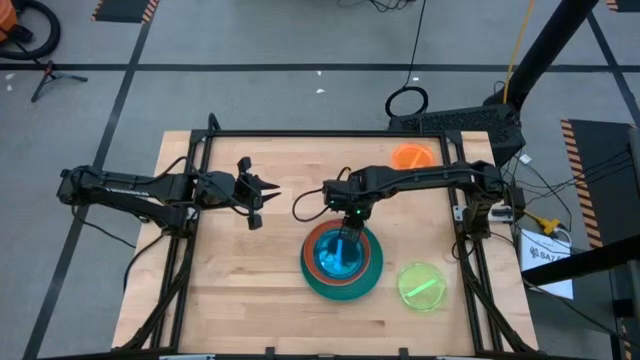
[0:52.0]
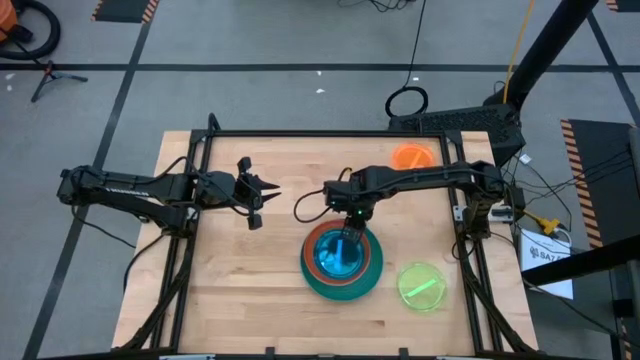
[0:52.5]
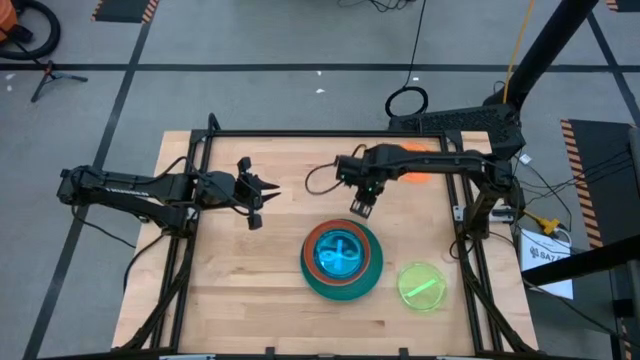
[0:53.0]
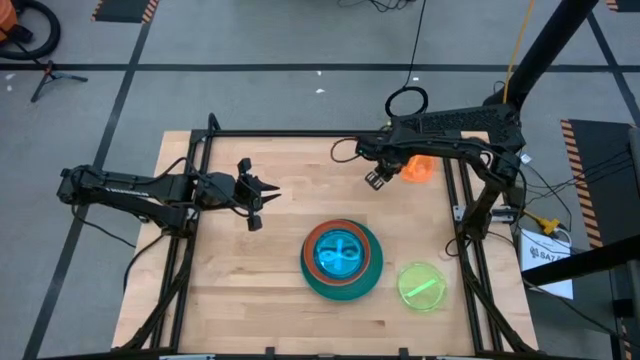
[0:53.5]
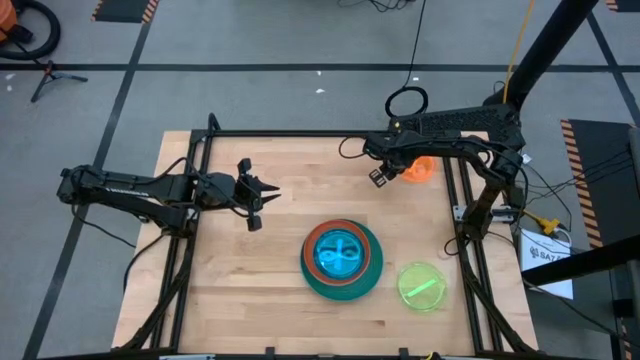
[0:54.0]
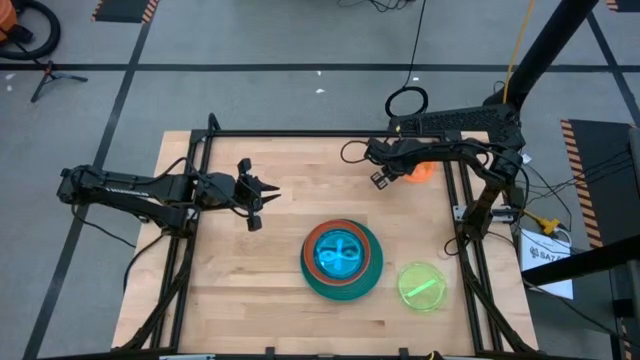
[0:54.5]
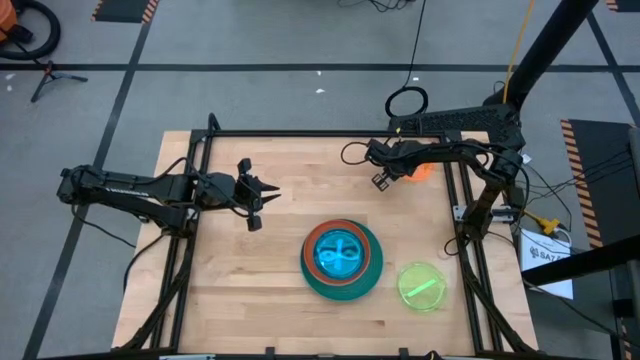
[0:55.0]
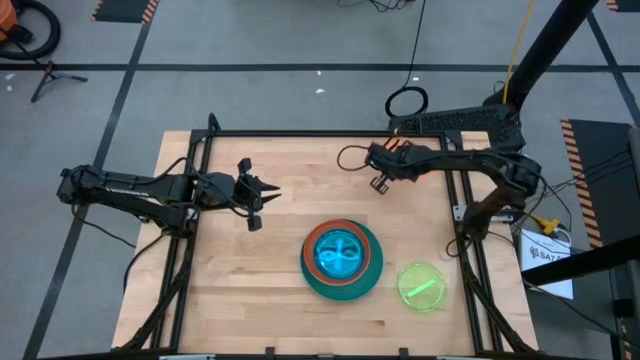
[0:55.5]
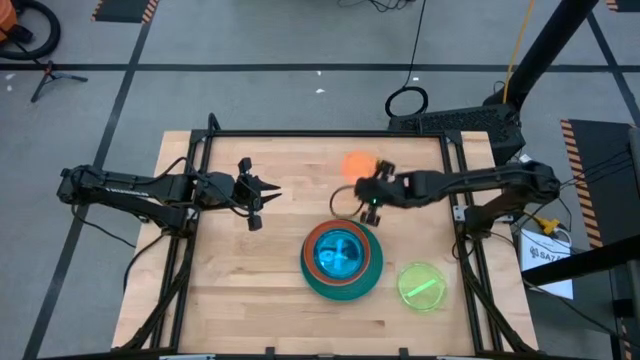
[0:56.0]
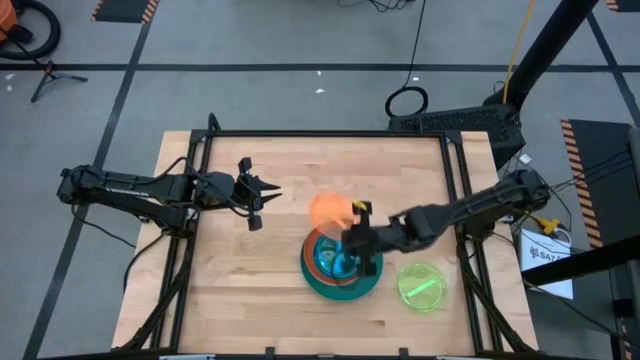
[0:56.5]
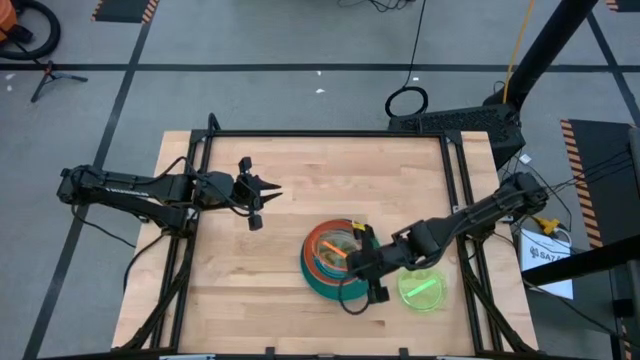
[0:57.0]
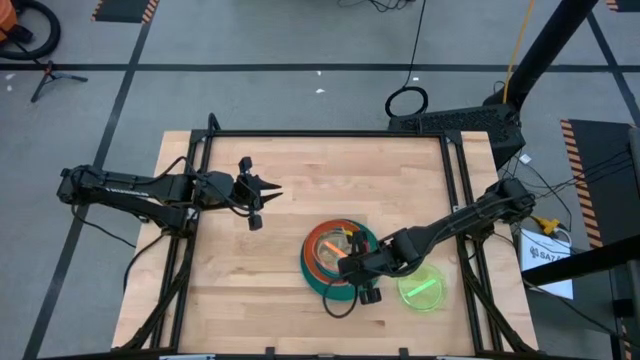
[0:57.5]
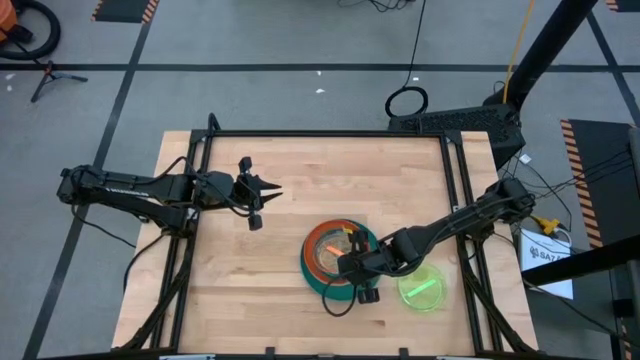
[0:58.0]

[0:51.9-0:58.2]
Task: Stack plastic plates
Stack the transparent orange plate on the transparent blue plate

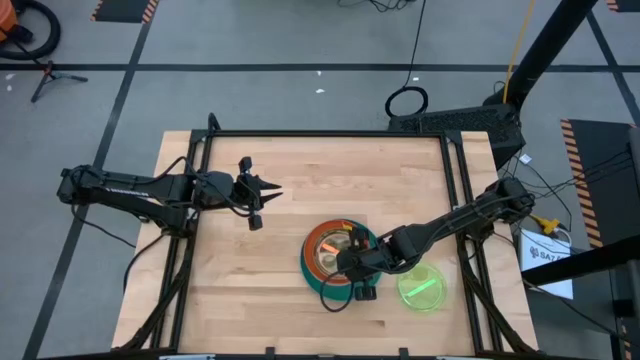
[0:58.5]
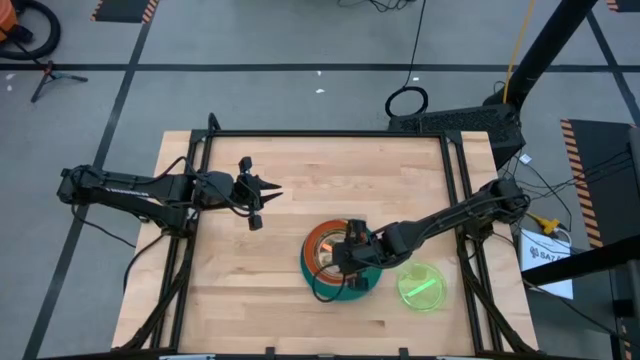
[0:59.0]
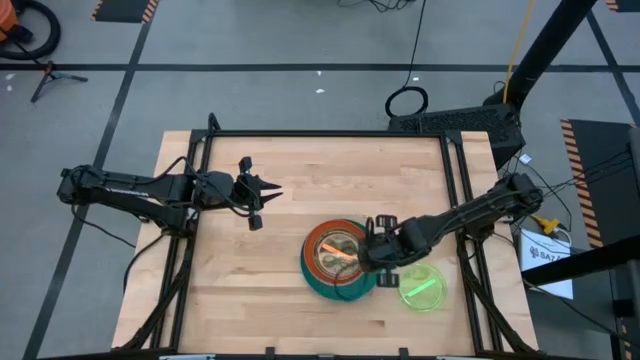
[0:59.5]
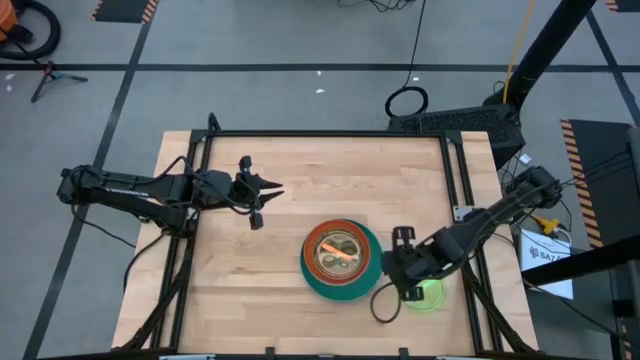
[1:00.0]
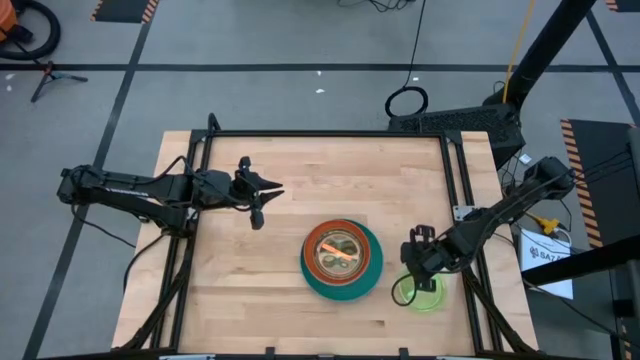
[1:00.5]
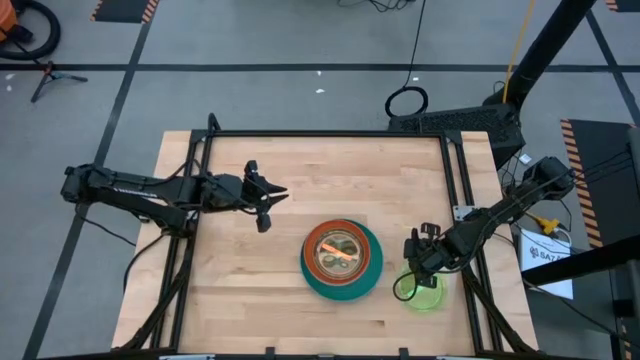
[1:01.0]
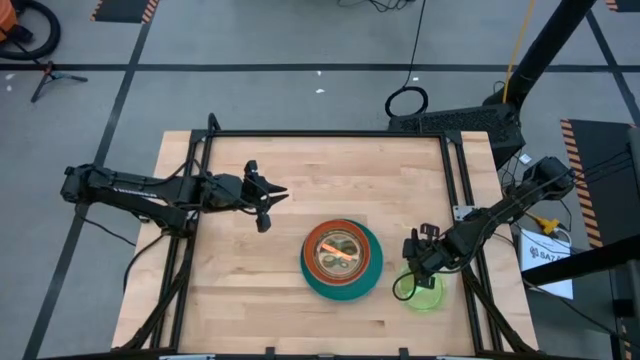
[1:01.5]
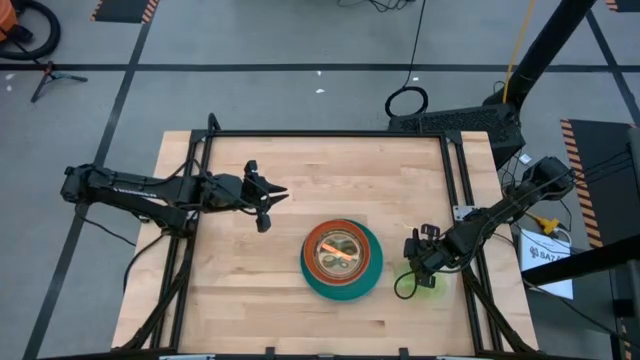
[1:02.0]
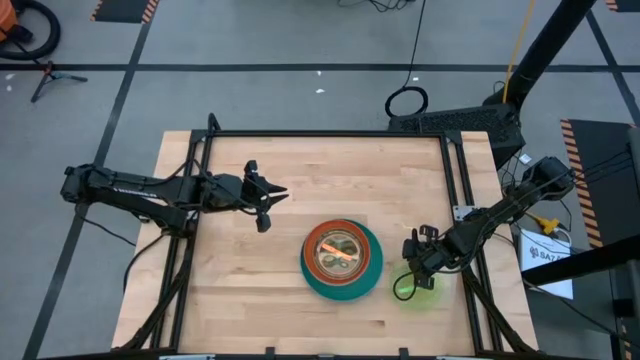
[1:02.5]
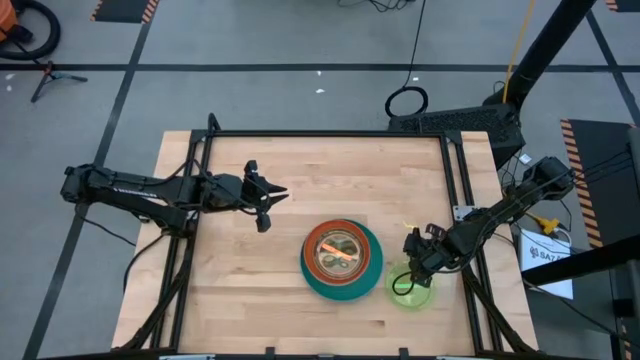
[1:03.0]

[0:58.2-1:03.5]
Stack the transparent green plate on the transparent orange plate

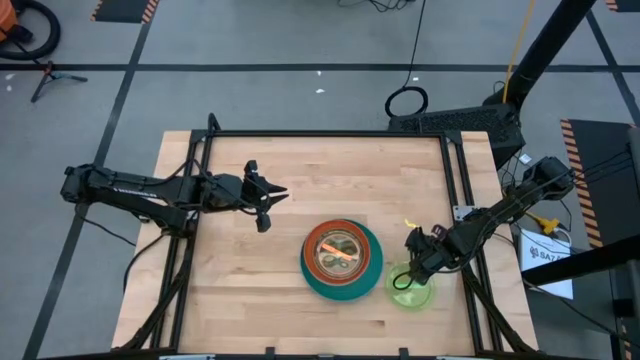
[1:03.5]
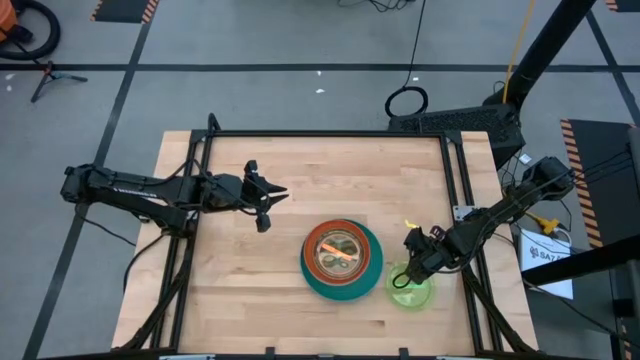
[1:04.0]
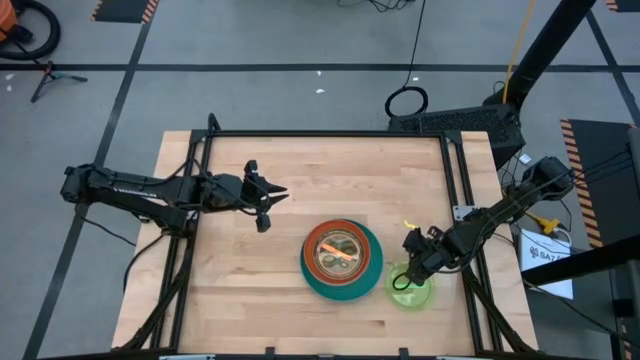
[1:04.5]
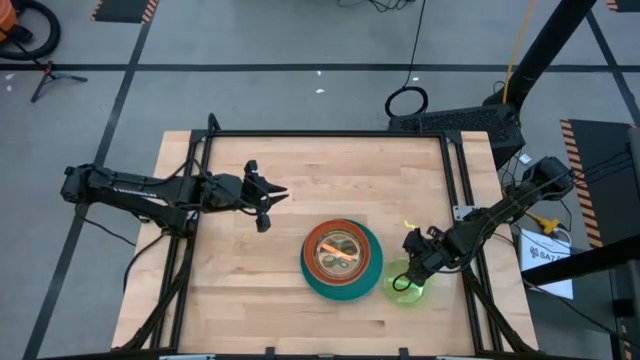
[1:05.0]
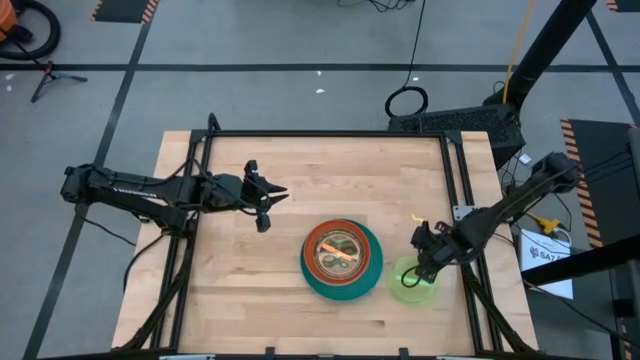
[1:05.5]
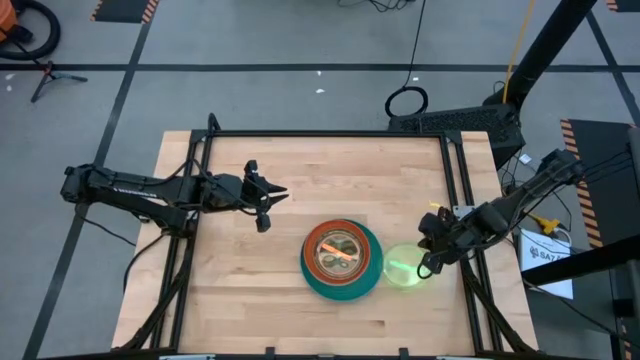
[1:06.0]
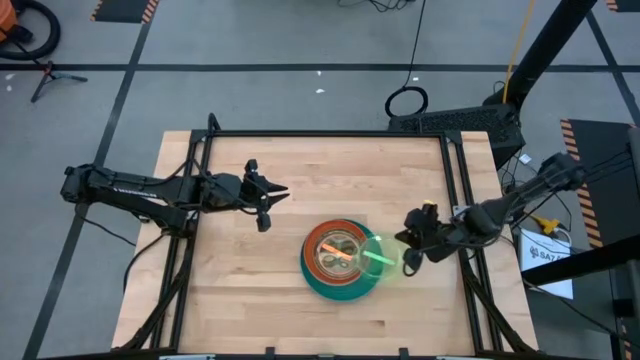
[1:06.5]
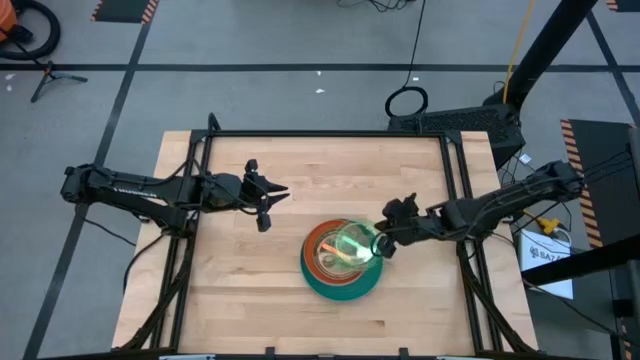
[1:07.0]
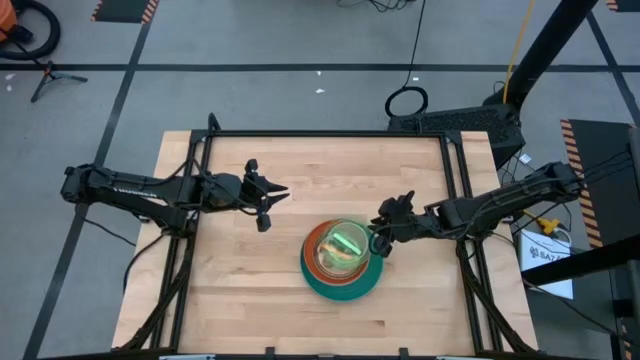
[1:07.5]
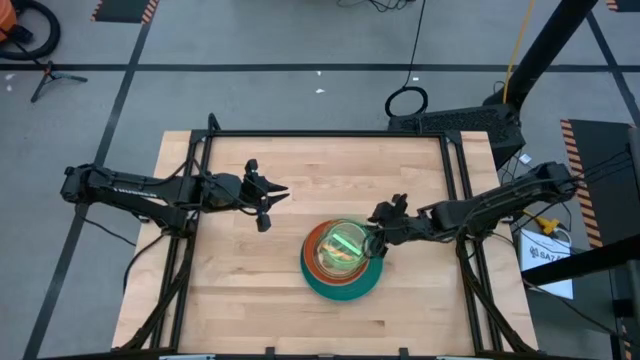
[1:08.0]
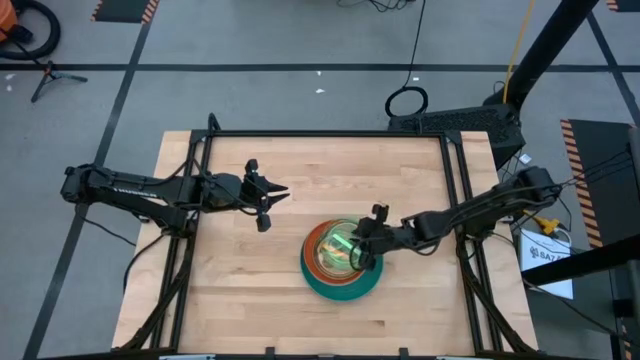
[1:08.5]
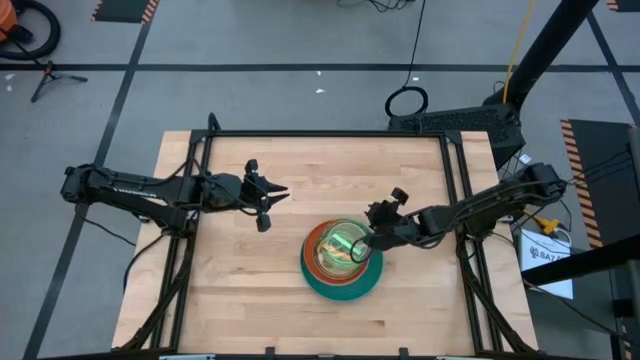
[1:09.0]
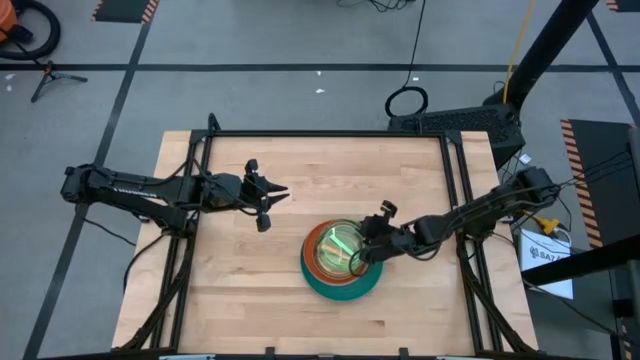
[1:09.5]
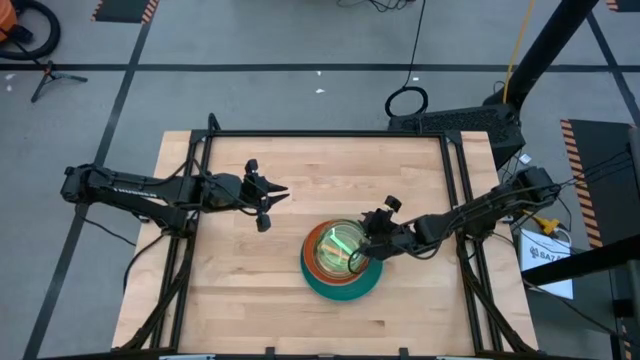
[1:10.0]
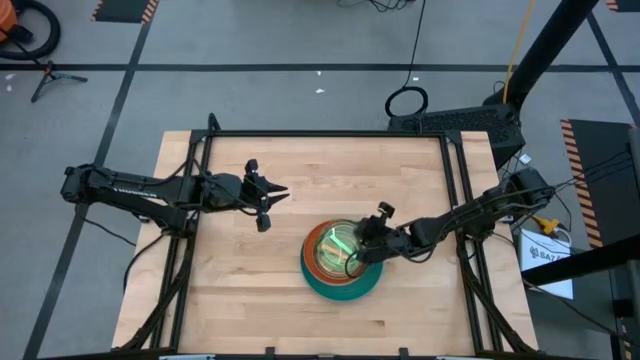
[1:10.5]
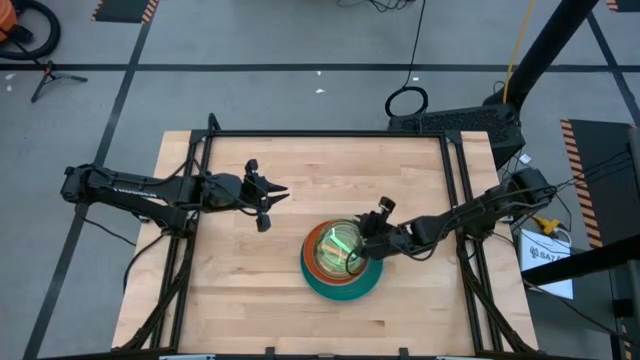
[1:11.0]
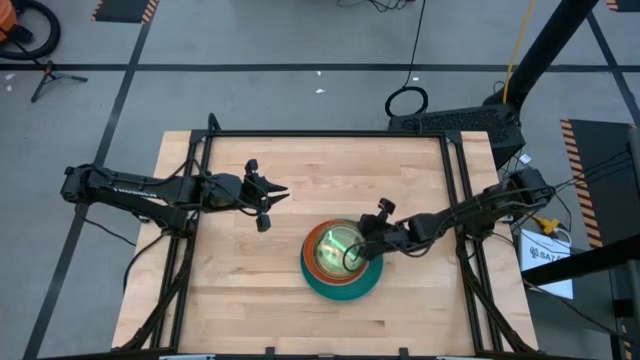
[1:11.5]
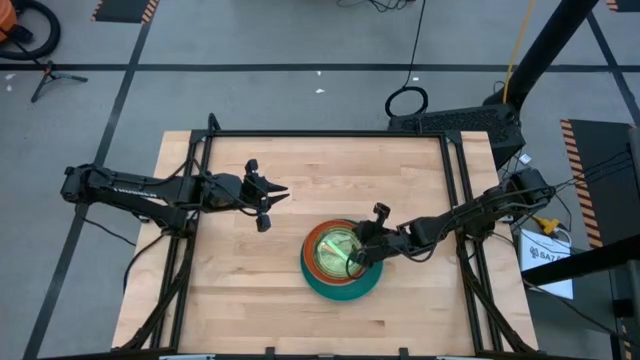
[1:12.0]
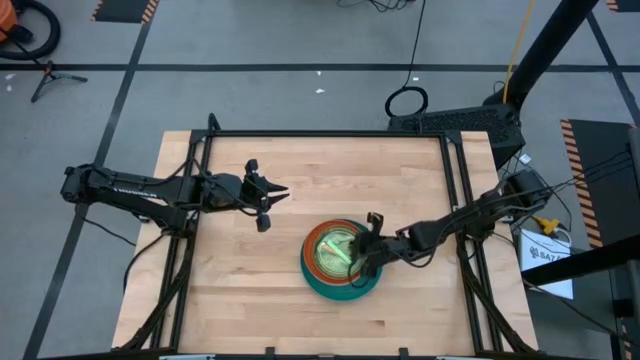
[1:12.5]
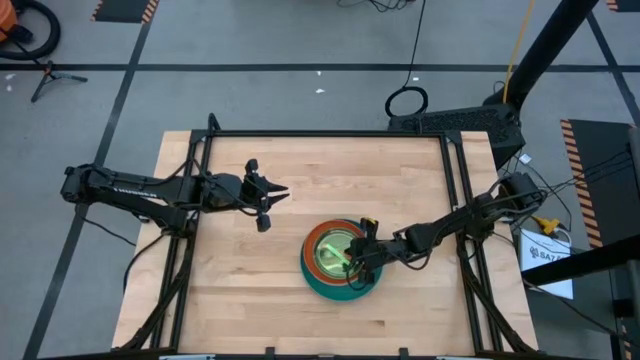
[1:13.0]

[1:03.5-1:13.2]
Stack the transparent green plate on the transparent orange plate
